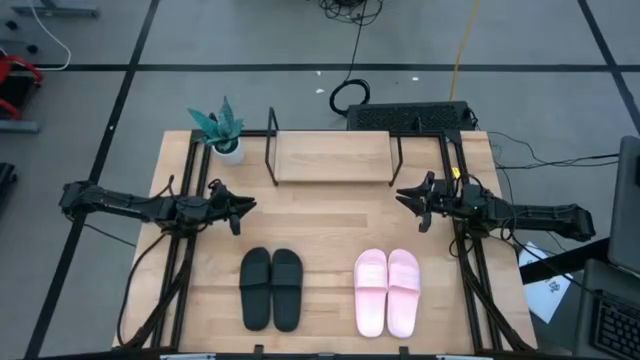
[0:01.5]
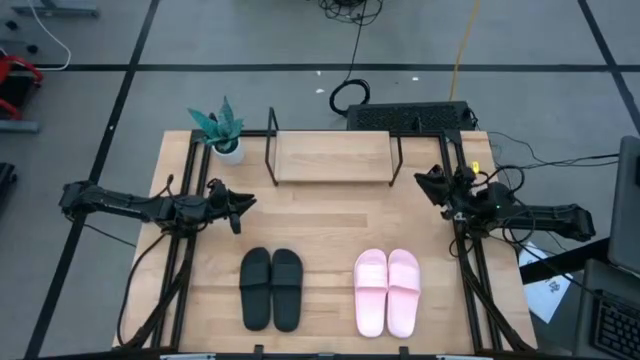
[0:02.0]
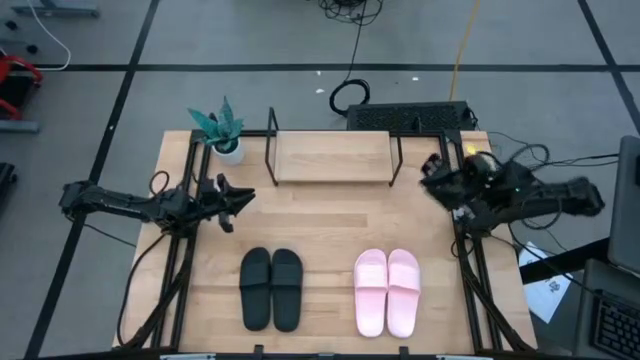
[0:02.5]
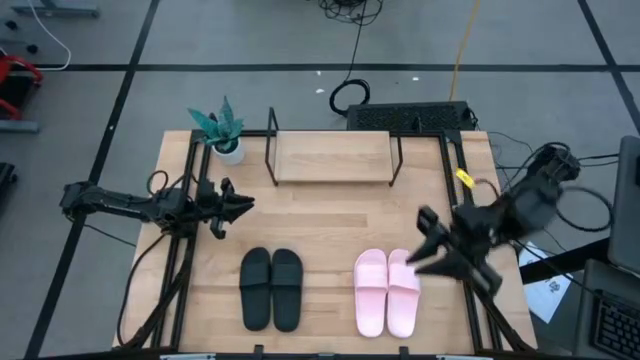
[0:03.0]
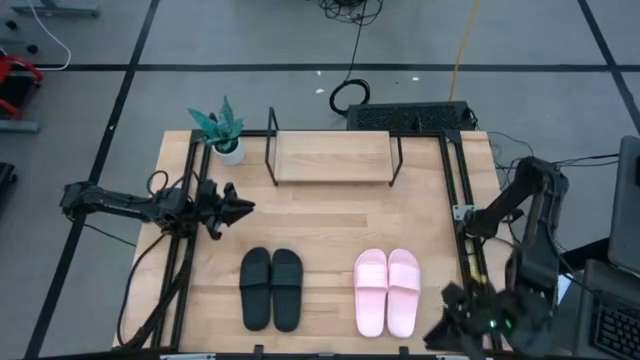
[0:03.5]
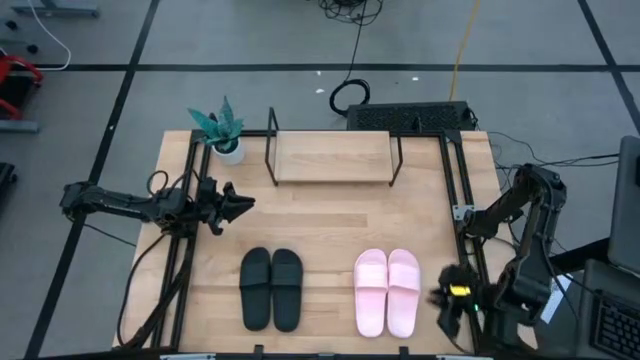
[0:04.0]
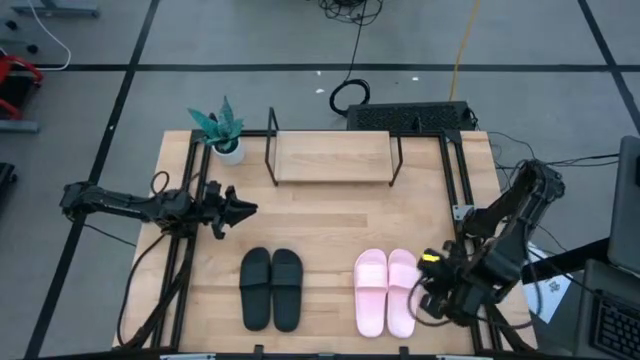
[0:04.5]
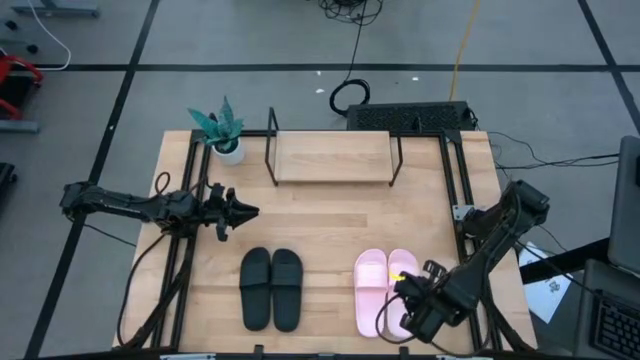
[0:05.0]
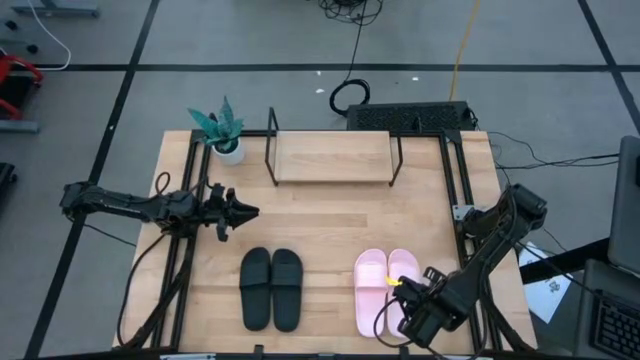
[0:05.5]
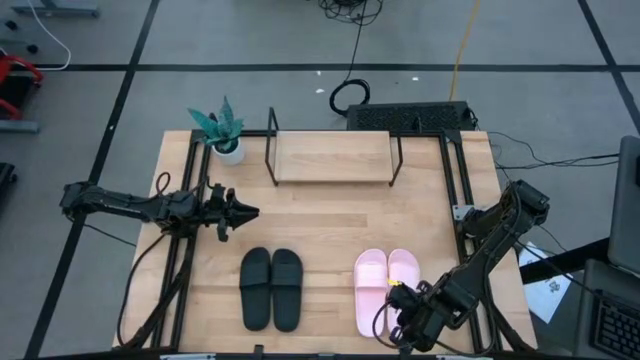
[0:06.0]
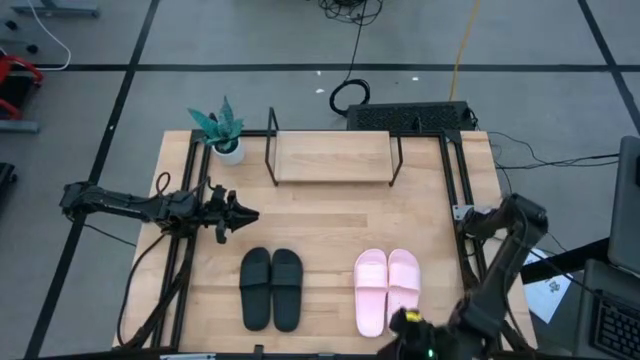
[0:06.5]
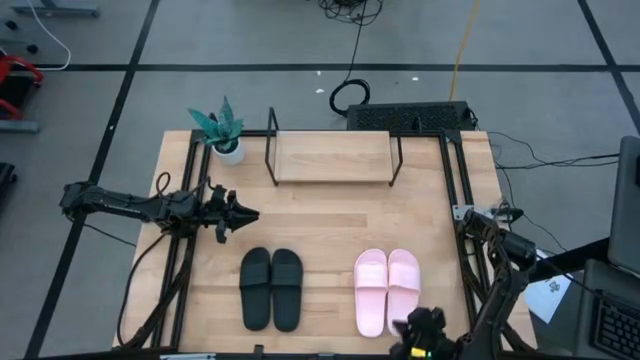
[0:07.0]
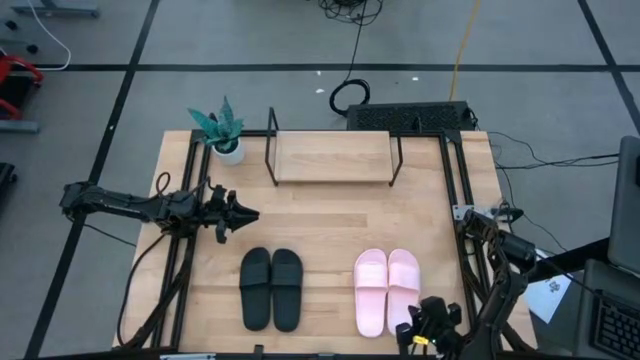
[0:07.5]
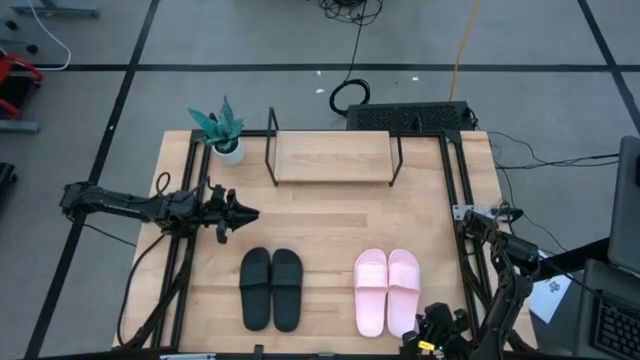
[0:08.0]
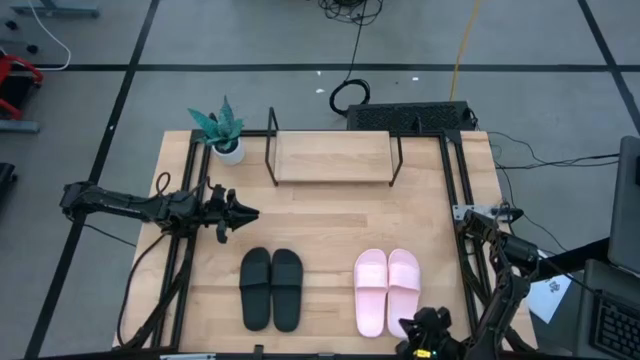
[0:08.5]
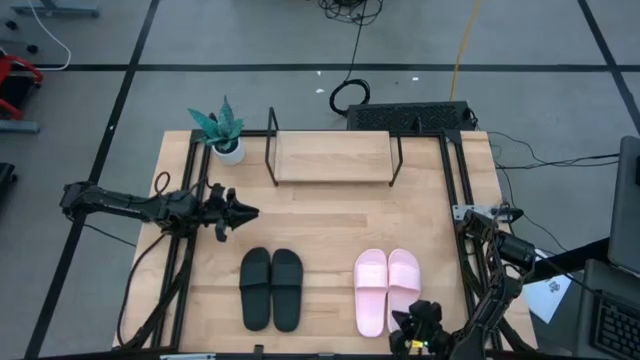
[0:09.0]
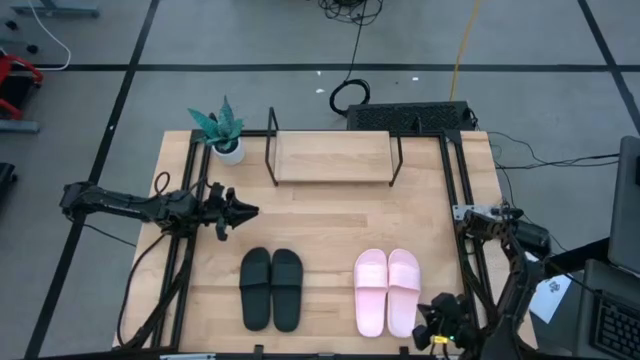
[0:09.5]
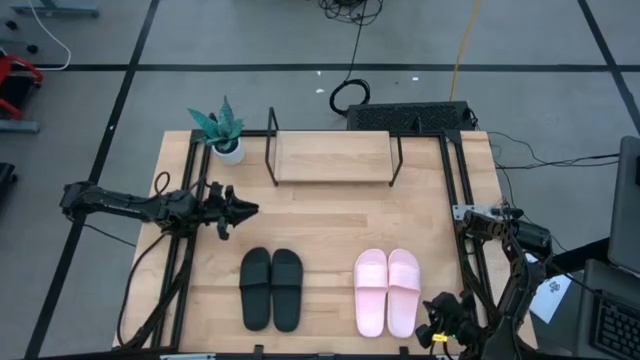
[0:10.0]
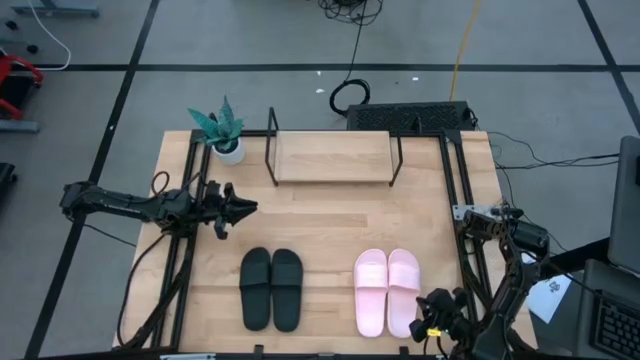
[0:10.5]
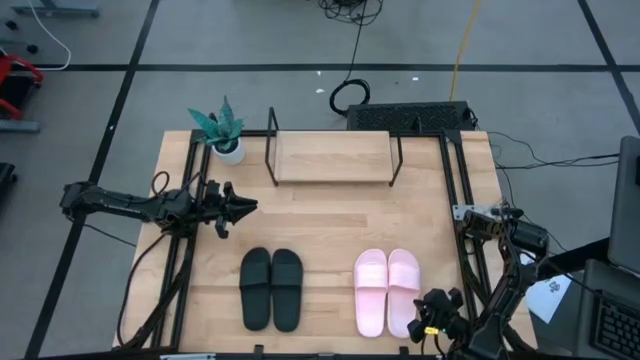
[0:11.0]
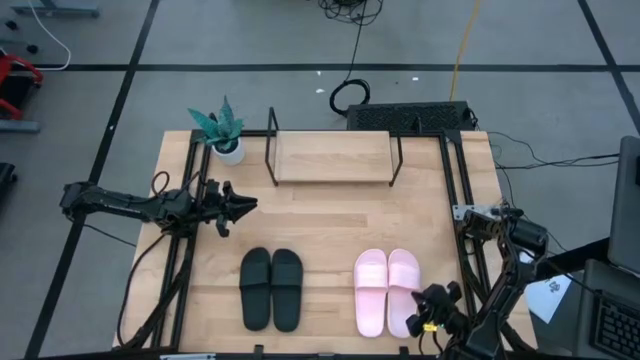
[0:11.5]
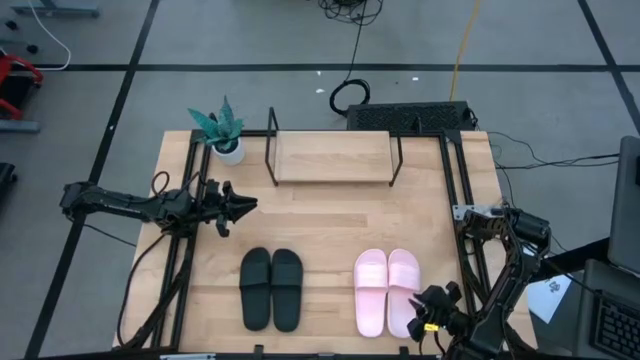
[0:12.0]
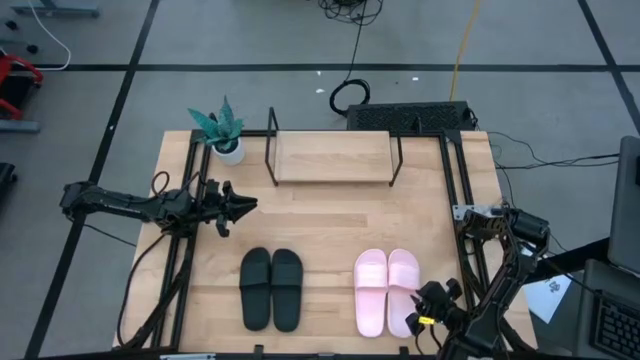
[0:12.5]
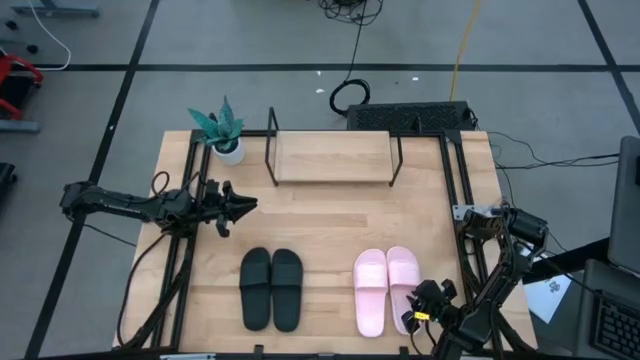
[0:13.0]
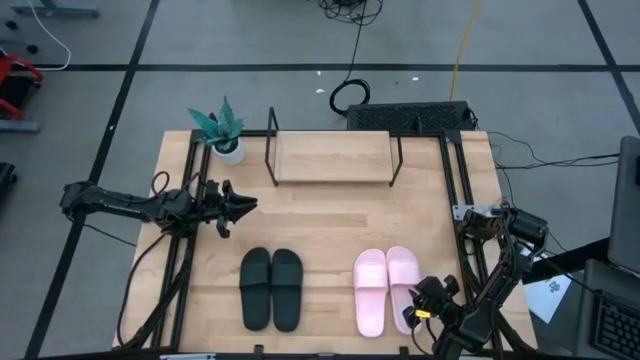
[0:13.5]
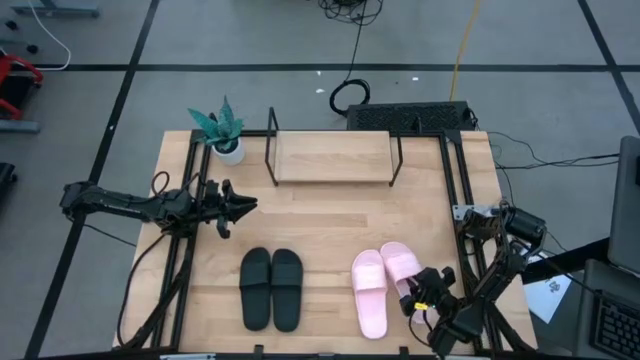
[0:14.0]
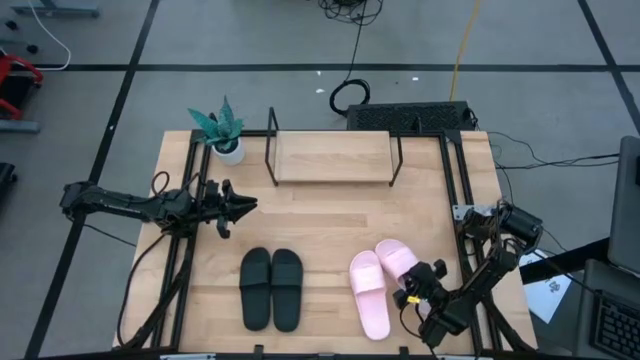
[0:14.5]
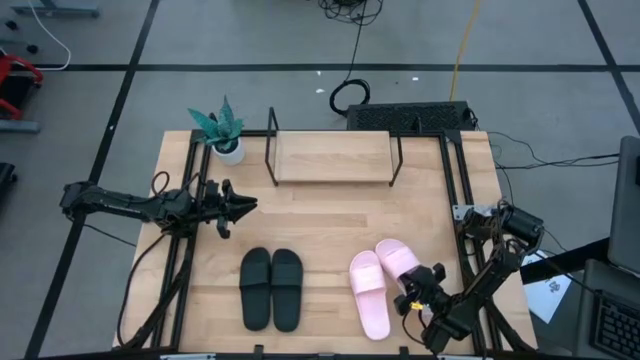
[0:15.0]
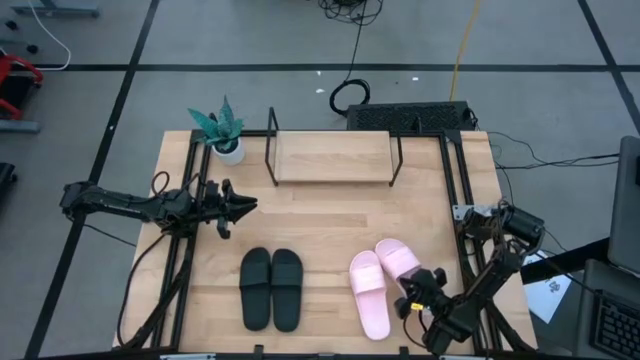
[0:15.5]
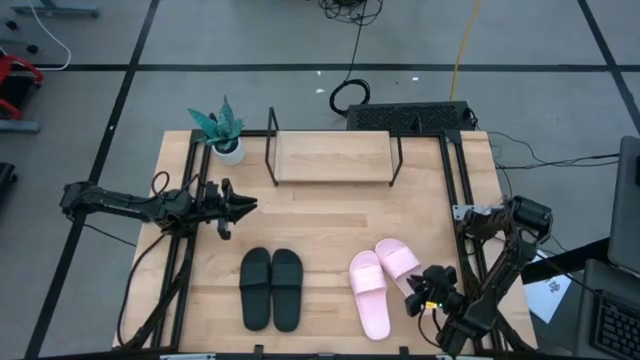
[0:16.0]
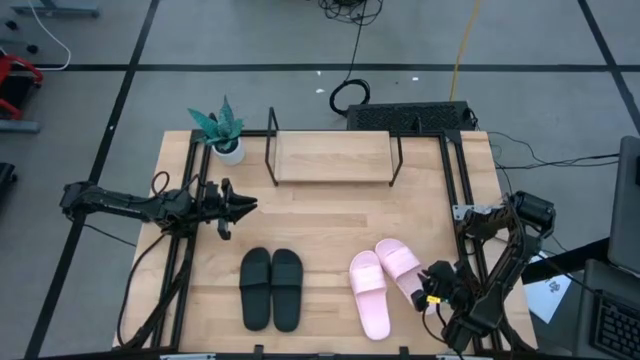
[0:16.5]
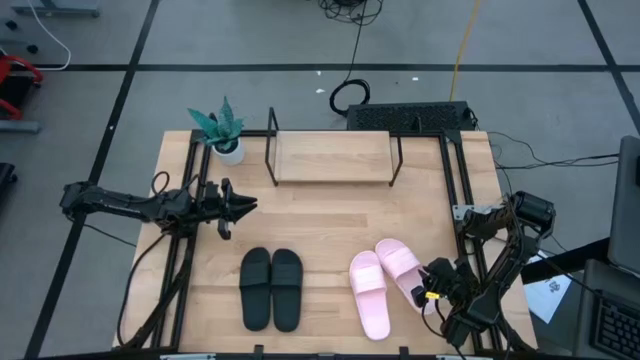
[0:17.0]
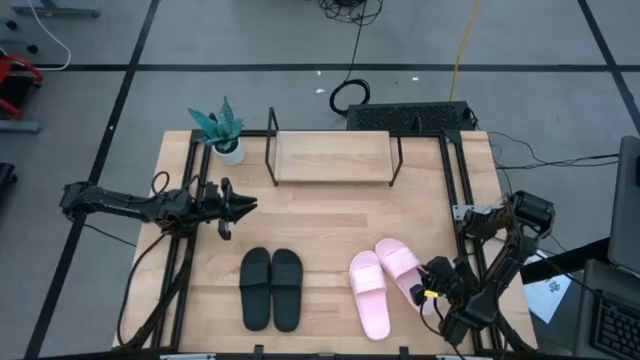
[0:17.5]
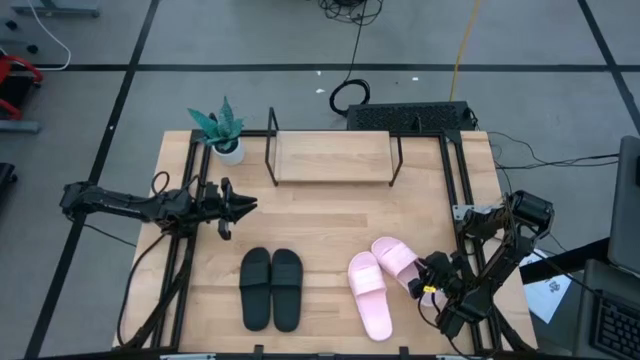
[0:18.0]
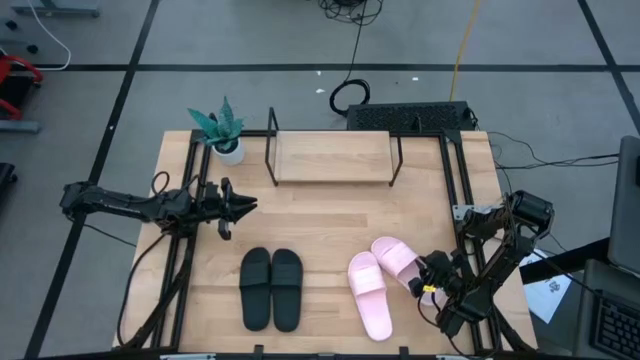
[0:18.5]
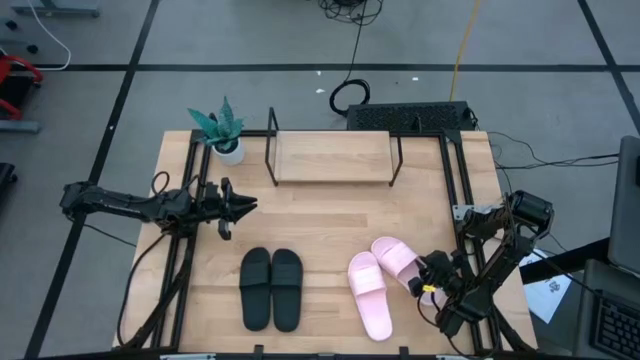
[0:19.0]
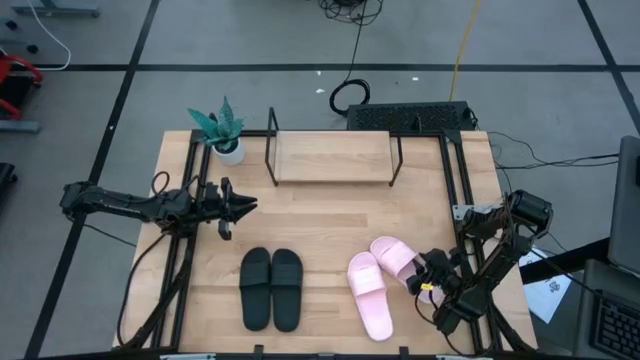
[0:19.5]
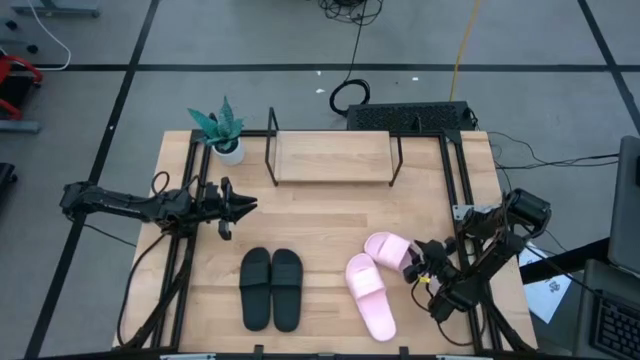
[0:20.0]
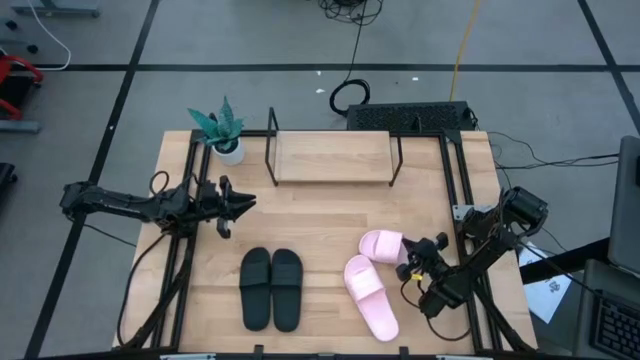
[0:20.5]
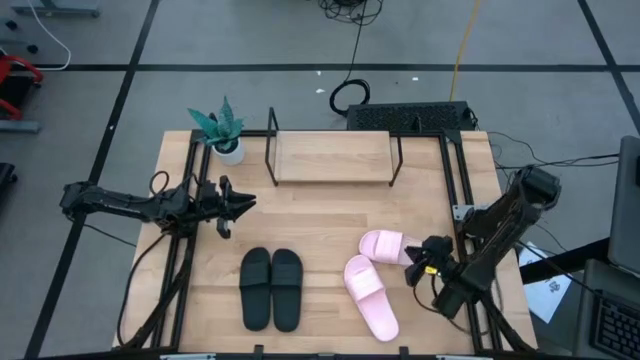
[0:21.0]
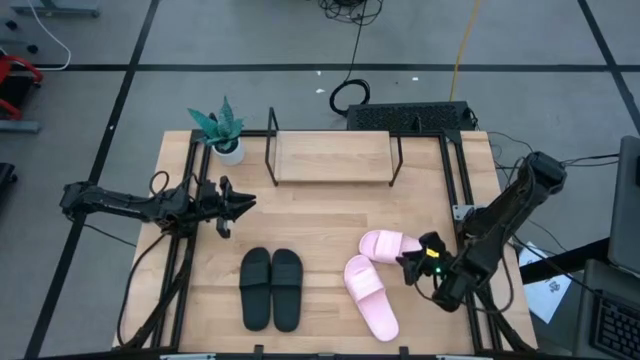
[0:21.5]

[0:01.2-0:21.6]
Task: Pick and place slides into the shelf
Put the right pink slipper on the shelf
